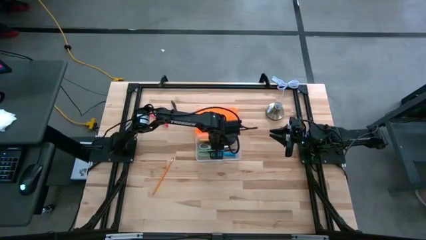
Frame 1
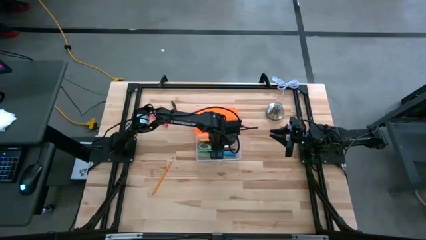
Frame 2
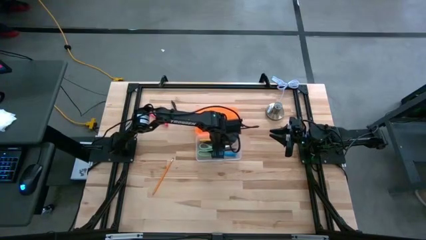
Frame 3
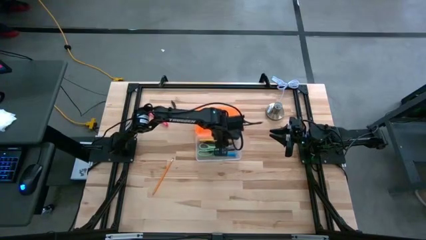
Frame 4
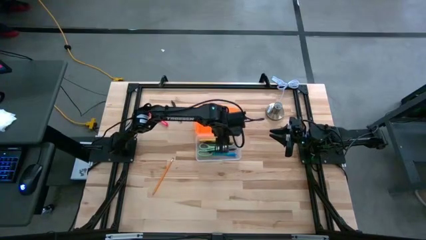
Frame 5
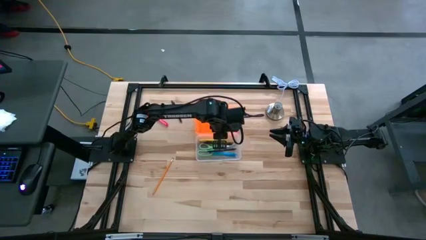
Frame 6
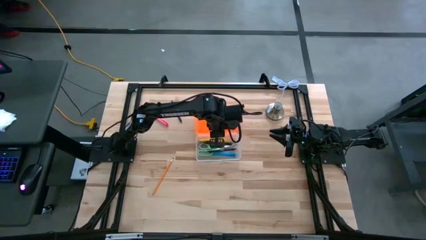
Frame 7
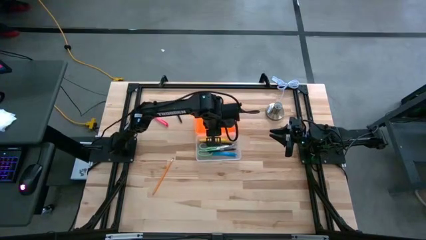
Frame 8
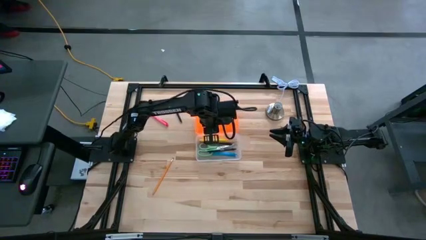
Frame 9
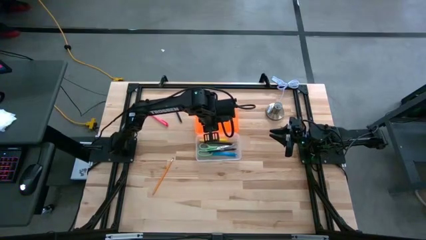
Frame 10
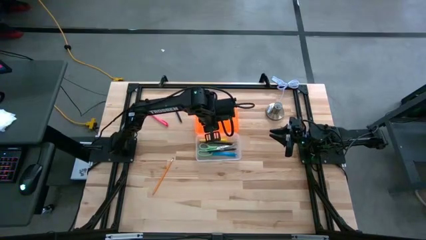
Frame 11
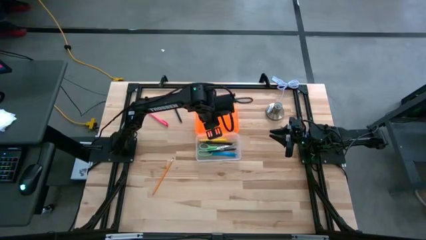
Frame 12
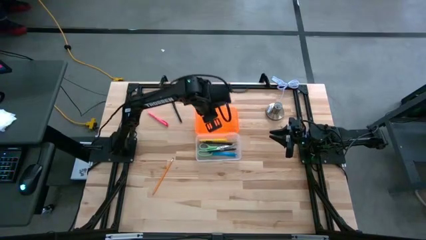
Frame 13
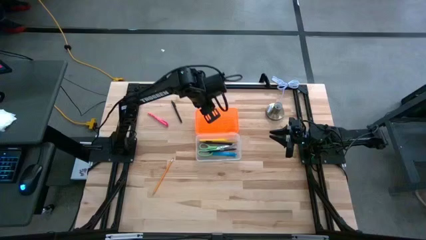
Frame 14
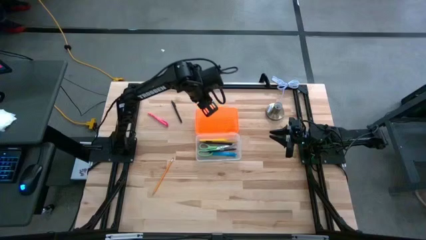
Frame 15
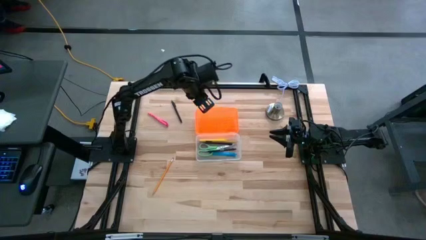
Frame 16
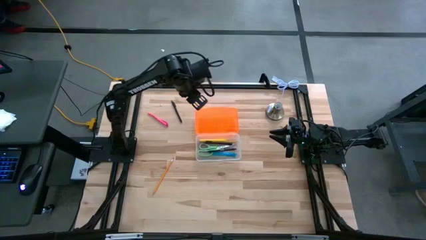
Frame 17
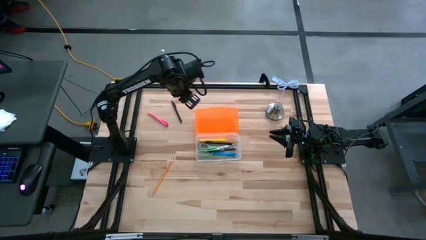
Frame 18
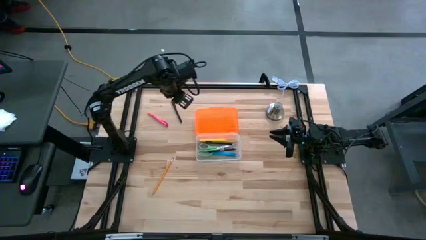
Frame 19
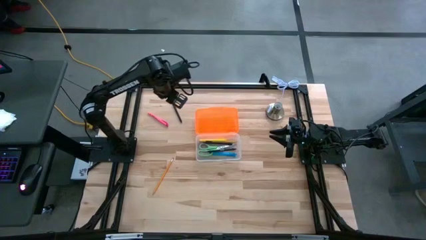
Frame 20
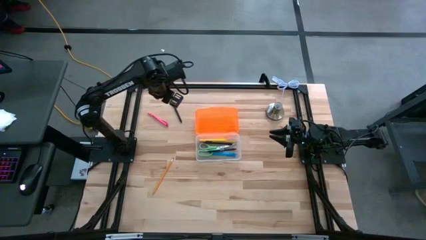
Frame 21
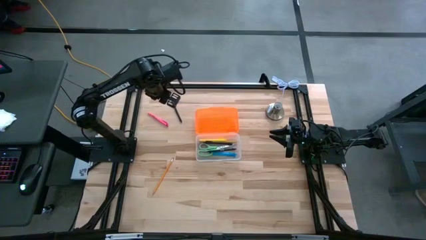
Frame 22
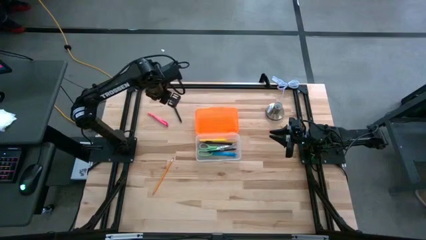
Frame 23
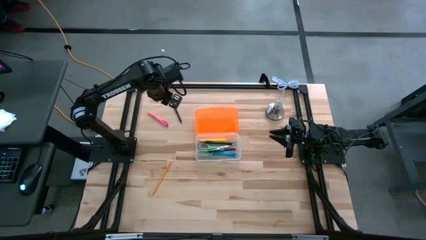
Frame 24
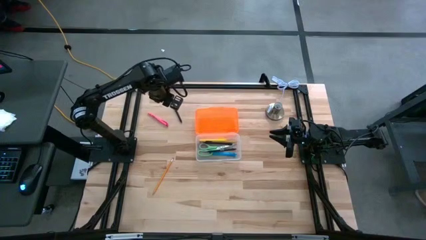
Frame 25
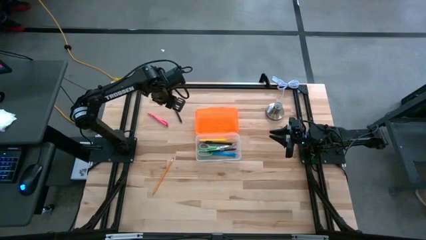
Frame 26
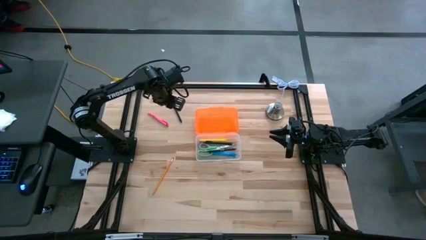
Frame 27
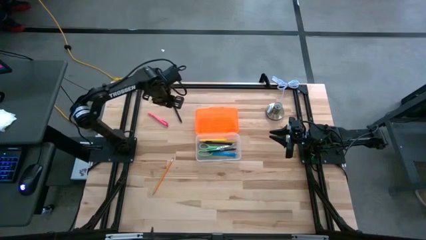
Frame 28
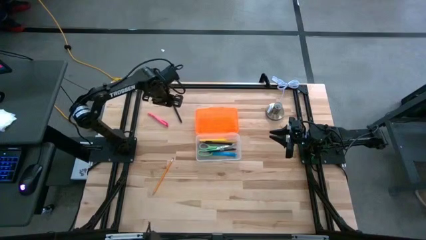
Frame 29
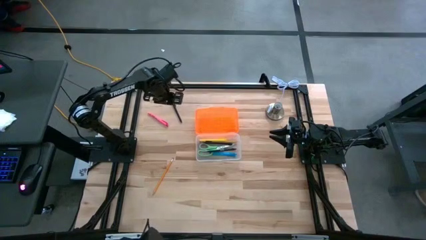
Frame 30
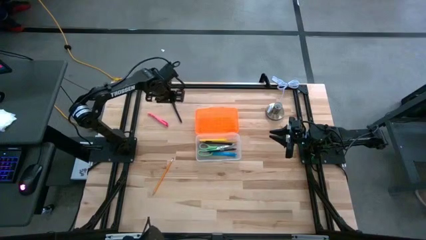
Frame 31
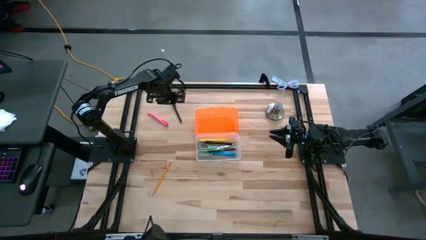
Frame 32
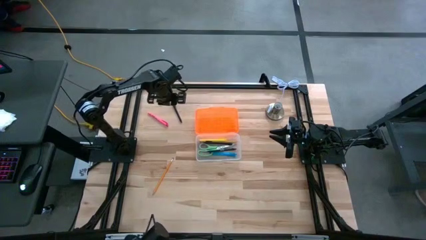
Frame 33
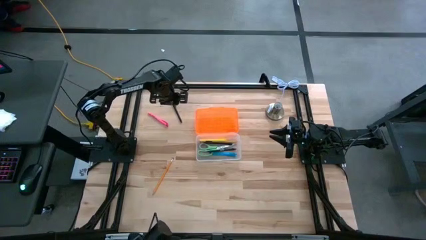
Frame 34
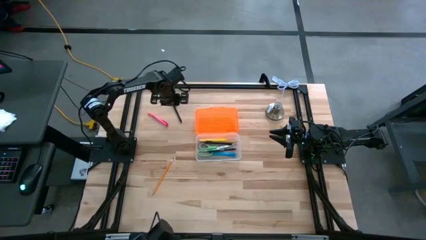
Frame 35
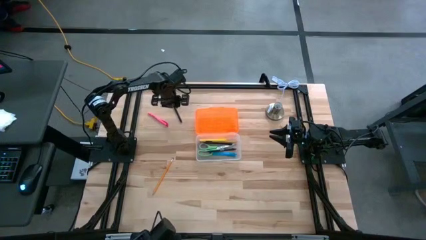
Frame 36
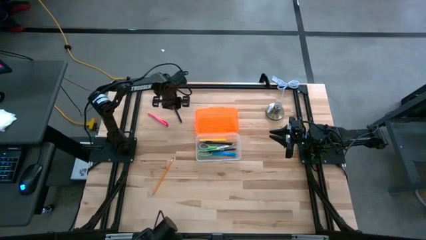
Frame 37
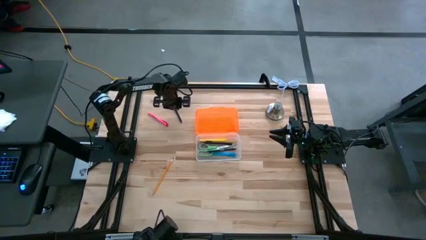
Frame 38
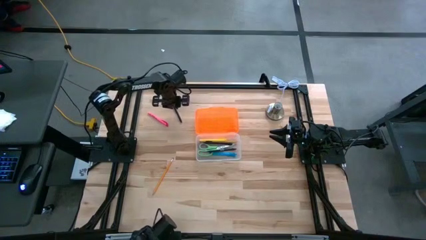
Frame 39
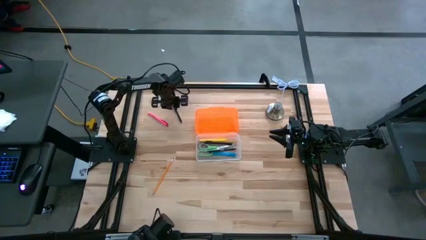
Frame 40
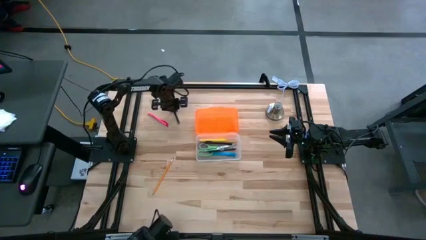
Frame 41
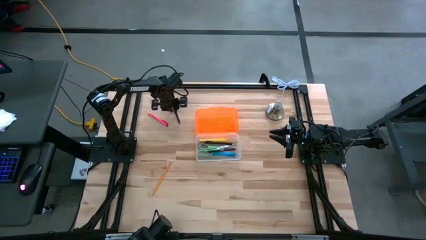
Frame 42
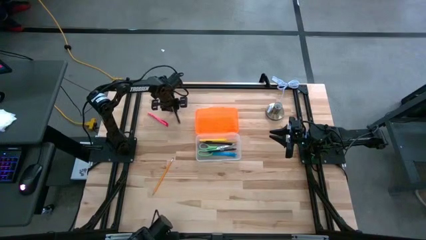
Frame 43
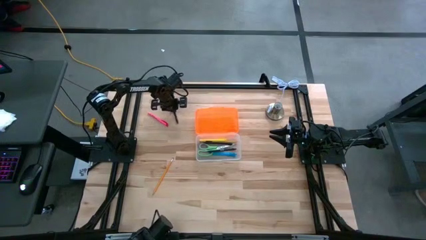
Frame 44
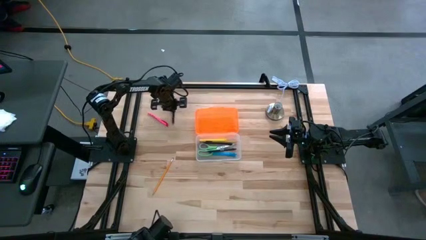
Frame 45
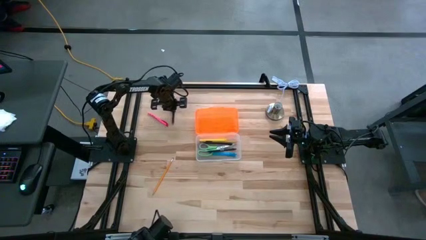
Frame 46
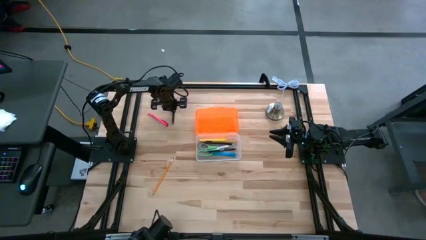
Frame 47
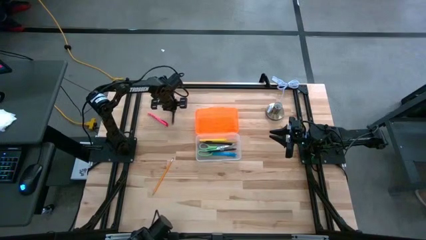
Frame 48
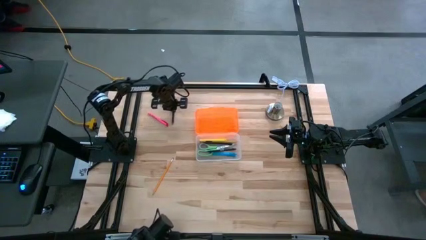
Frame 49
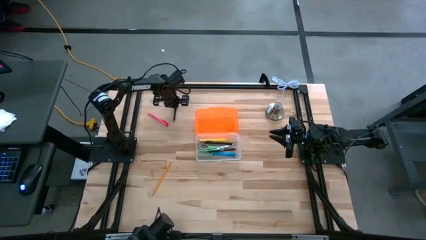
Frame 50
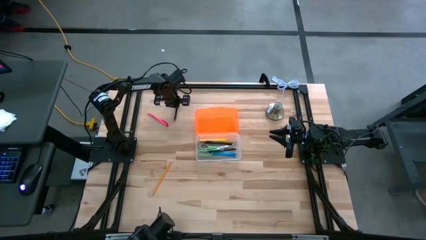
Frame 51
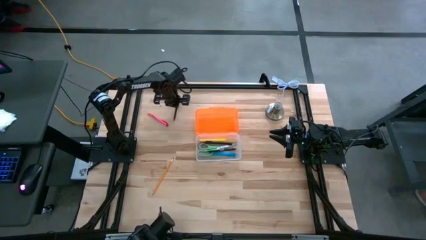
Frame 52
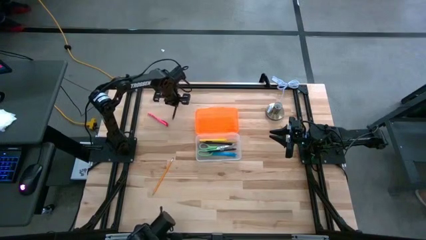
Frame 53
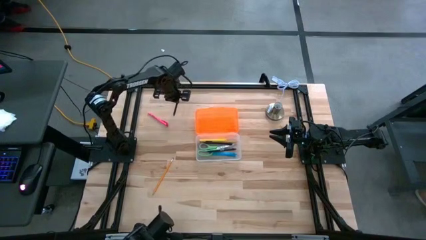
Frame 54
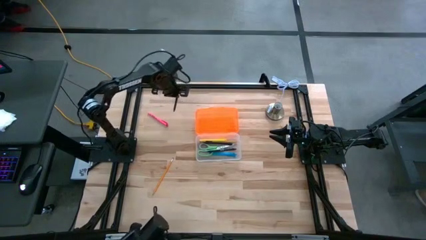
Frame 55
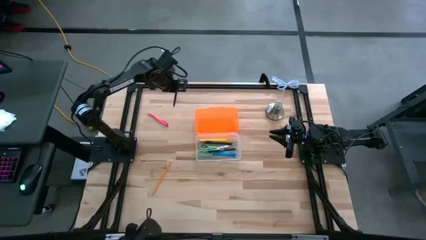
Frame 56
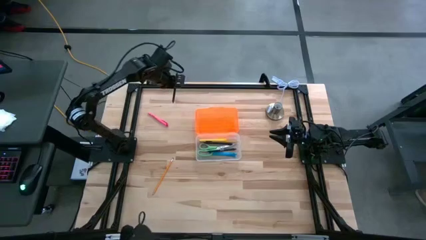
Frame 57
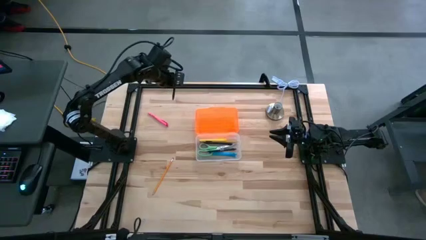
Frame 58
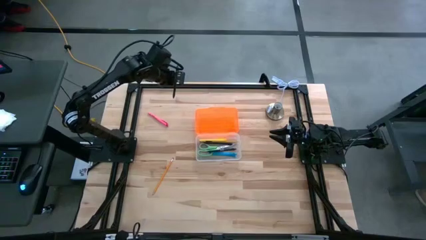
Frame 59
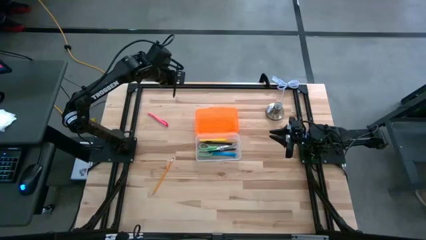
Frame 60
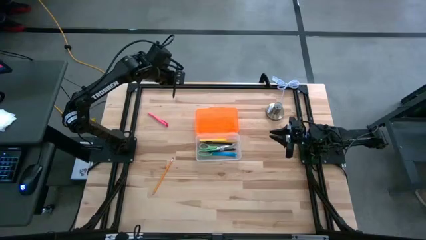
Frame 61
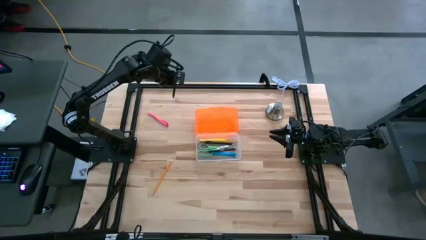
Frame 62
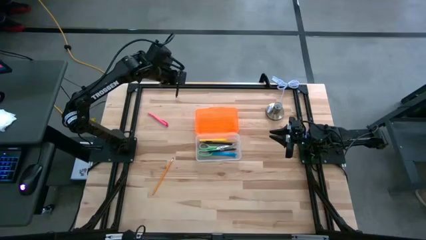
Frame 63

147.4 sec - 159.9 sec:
Task: Pick & place school supplies into a supply box
Put the black pen into the orange supply box
